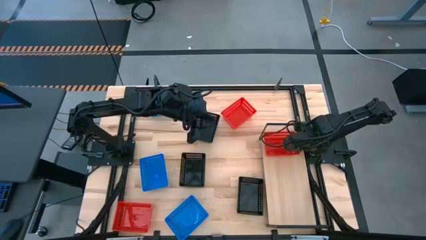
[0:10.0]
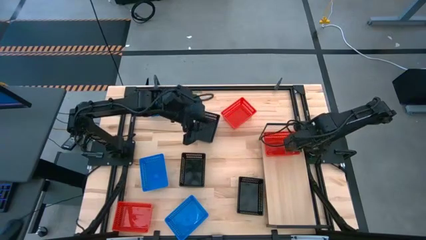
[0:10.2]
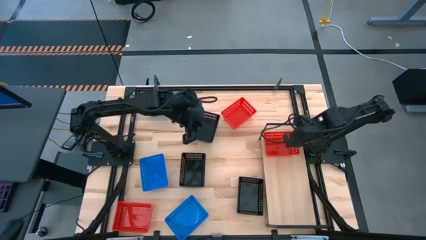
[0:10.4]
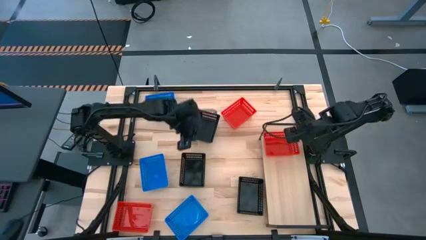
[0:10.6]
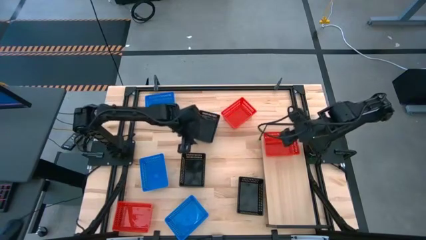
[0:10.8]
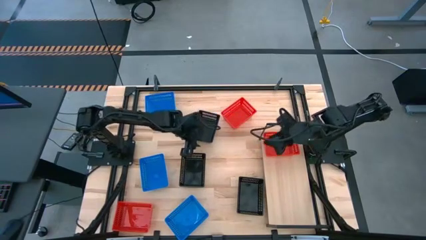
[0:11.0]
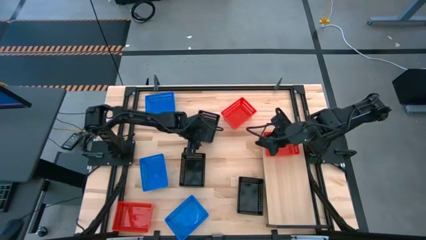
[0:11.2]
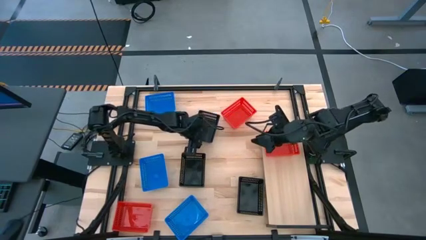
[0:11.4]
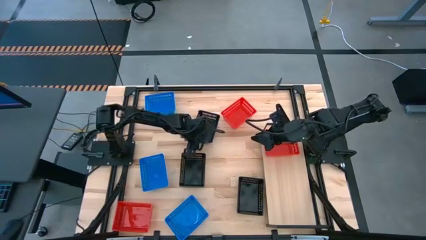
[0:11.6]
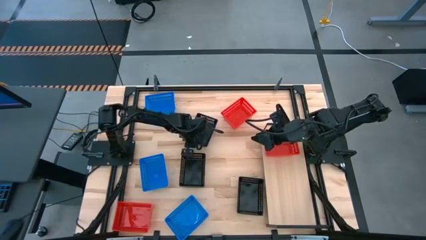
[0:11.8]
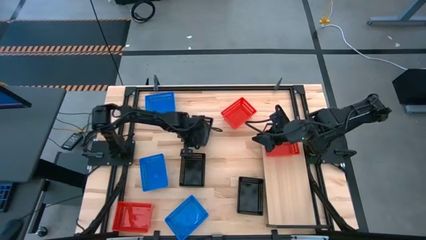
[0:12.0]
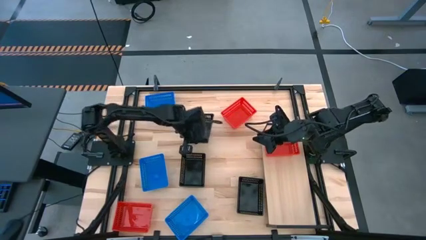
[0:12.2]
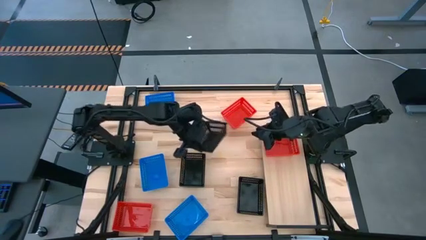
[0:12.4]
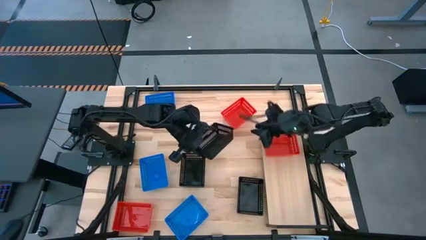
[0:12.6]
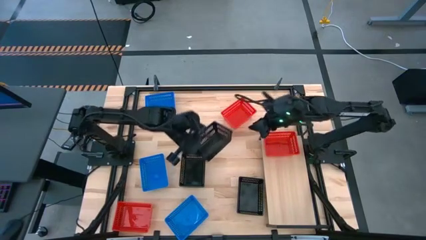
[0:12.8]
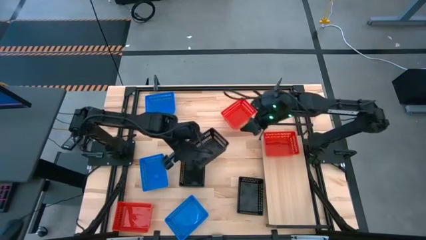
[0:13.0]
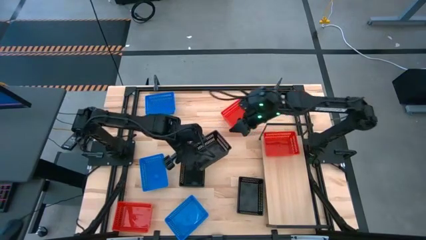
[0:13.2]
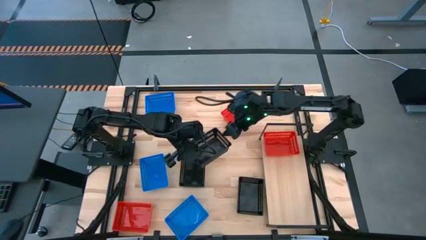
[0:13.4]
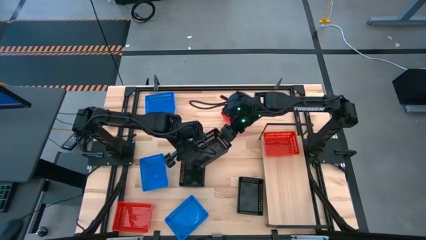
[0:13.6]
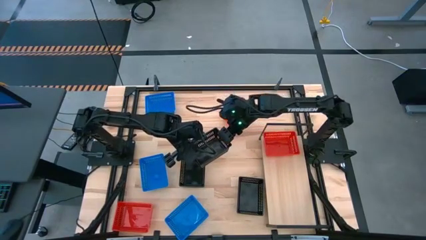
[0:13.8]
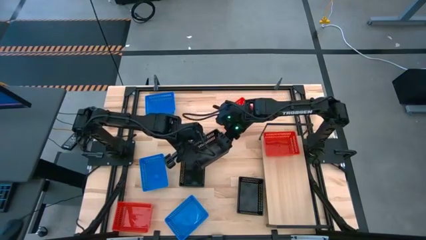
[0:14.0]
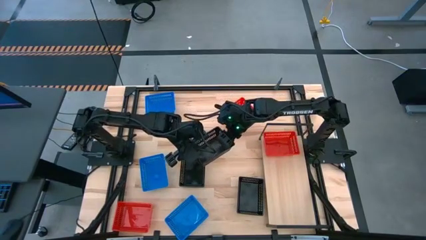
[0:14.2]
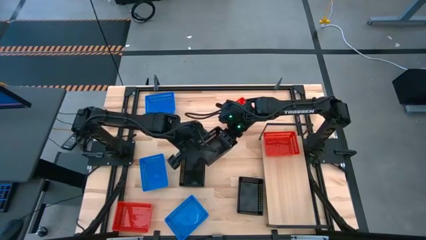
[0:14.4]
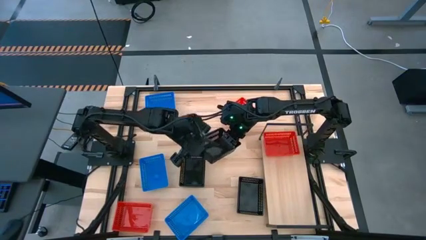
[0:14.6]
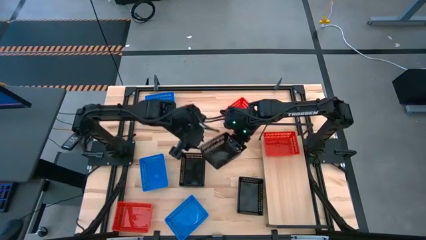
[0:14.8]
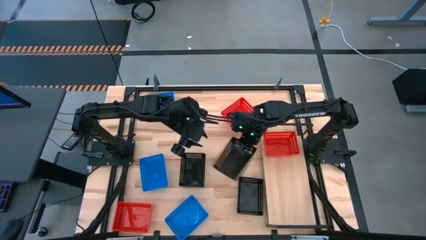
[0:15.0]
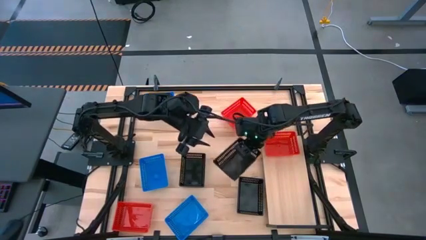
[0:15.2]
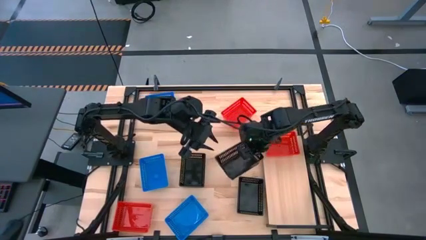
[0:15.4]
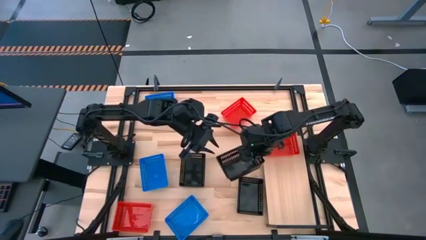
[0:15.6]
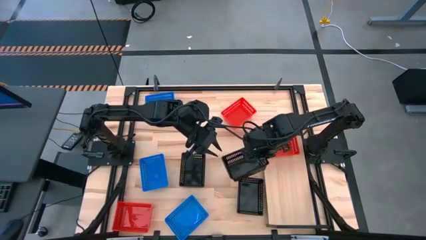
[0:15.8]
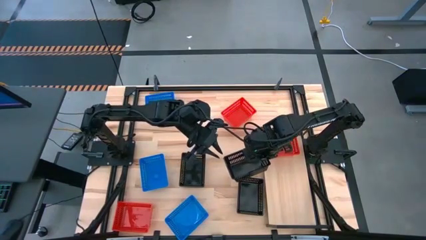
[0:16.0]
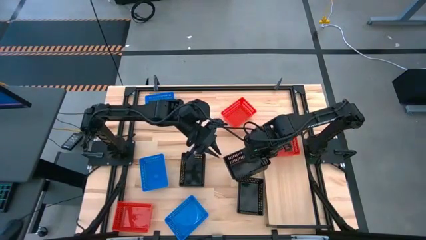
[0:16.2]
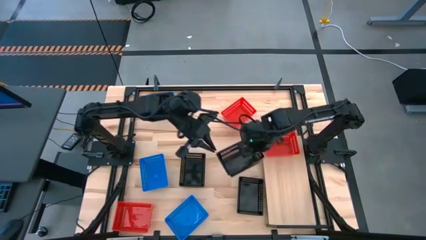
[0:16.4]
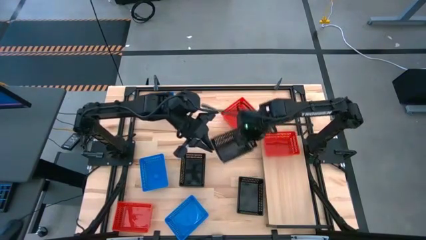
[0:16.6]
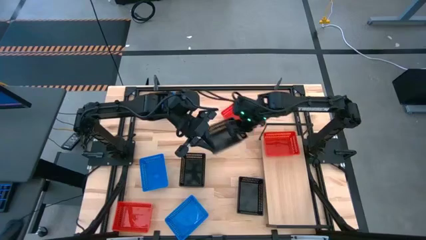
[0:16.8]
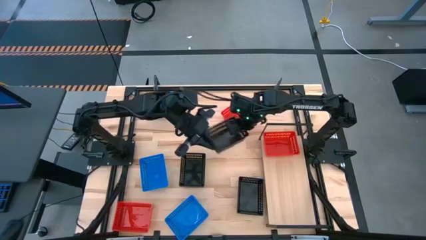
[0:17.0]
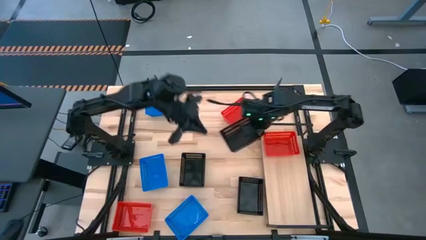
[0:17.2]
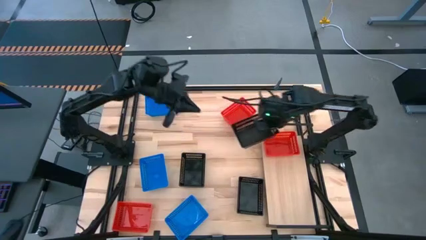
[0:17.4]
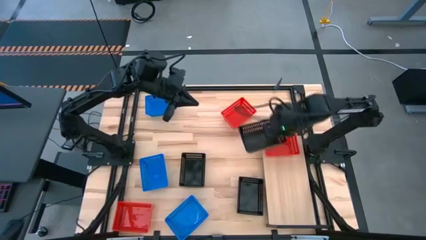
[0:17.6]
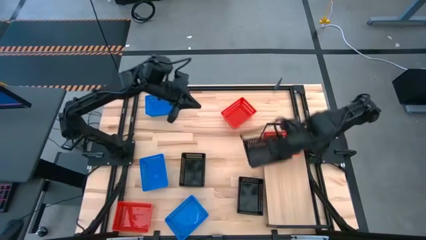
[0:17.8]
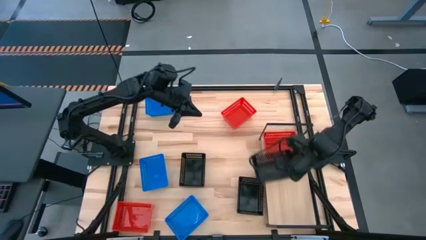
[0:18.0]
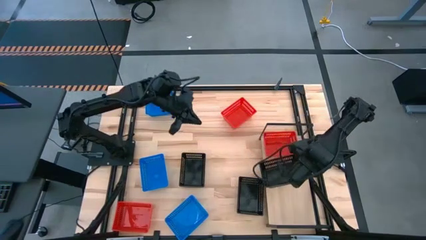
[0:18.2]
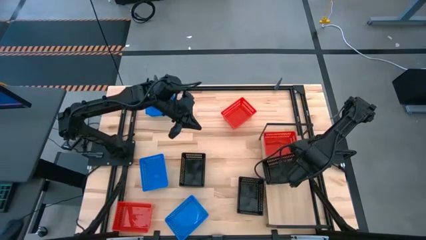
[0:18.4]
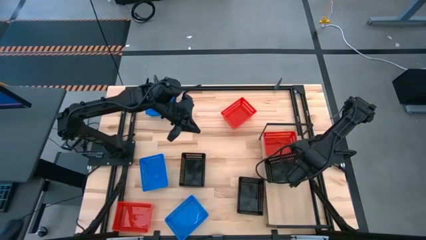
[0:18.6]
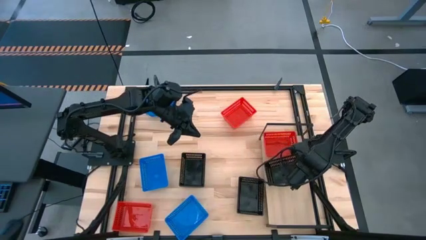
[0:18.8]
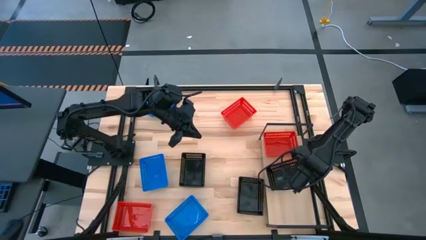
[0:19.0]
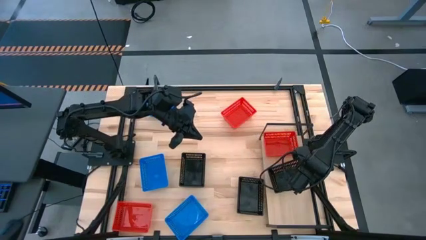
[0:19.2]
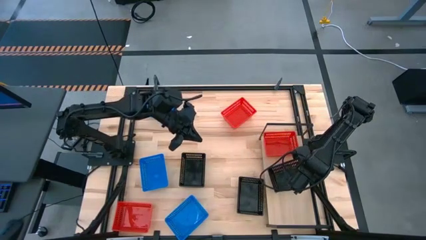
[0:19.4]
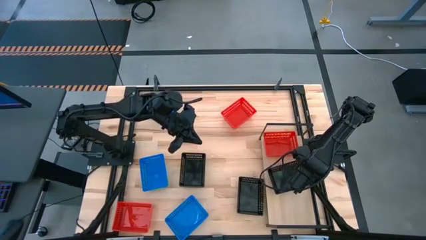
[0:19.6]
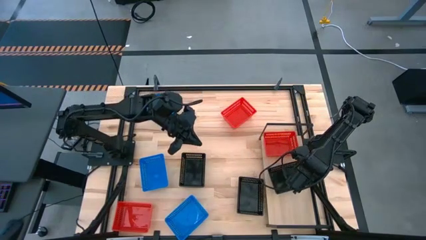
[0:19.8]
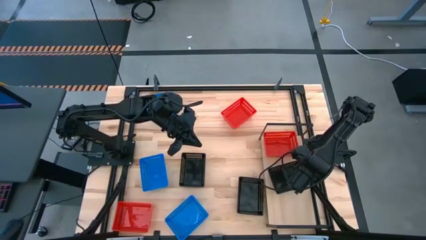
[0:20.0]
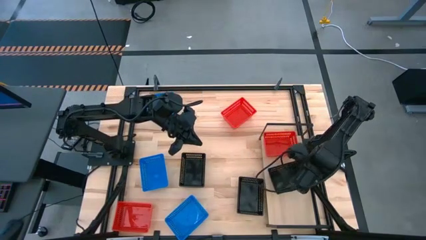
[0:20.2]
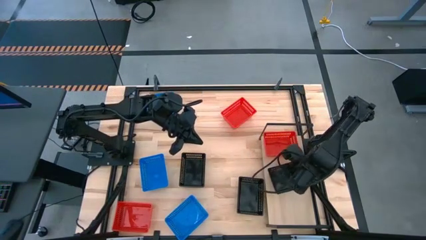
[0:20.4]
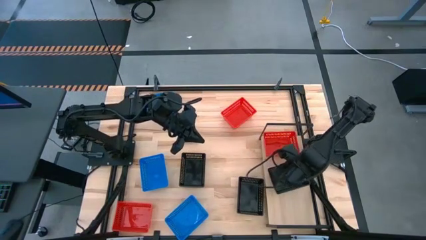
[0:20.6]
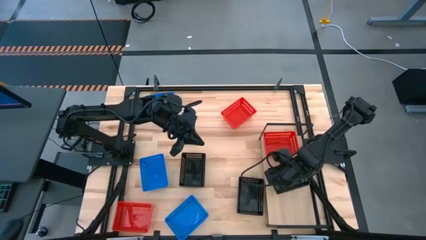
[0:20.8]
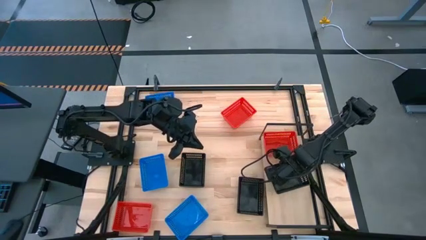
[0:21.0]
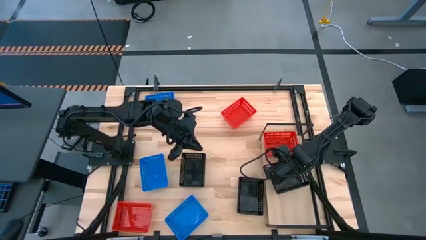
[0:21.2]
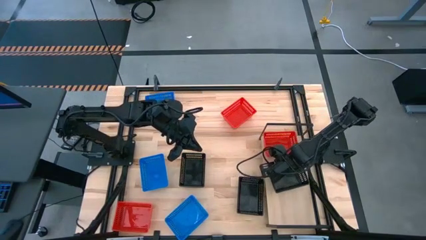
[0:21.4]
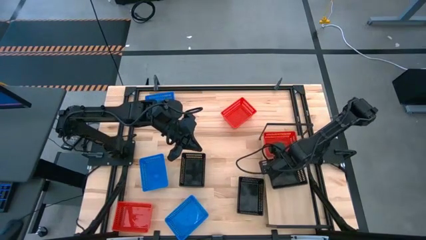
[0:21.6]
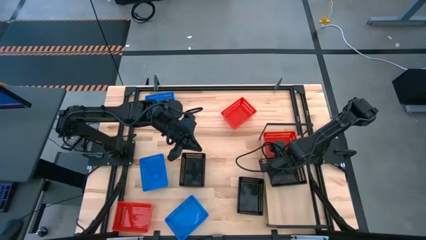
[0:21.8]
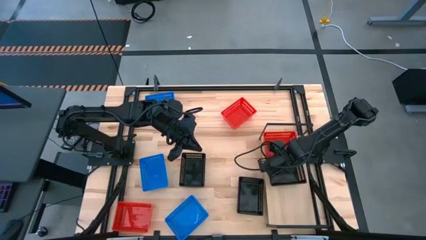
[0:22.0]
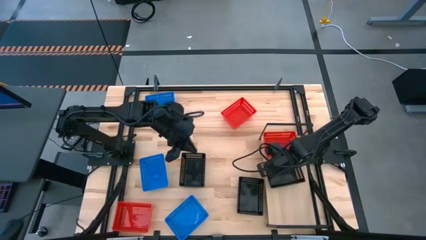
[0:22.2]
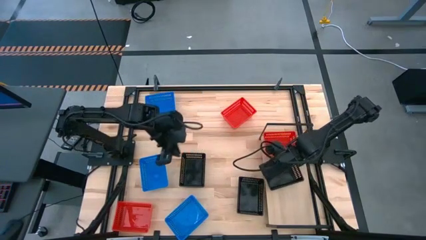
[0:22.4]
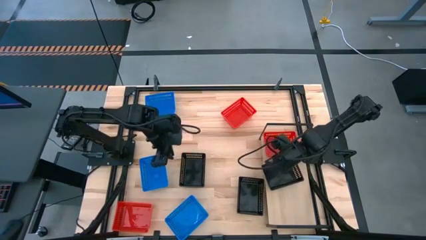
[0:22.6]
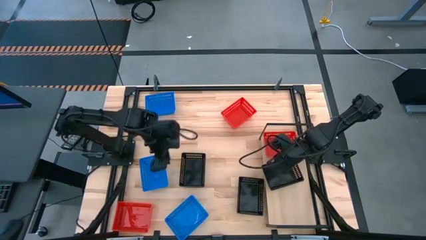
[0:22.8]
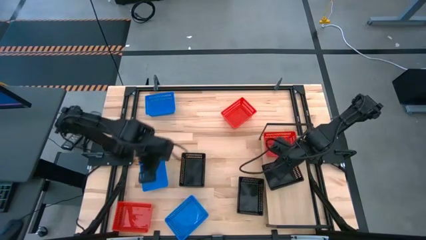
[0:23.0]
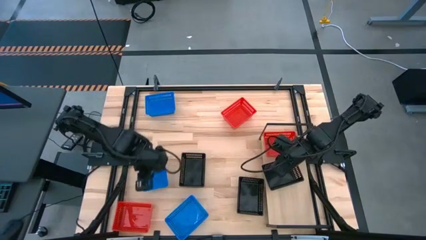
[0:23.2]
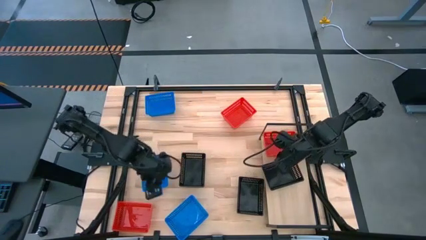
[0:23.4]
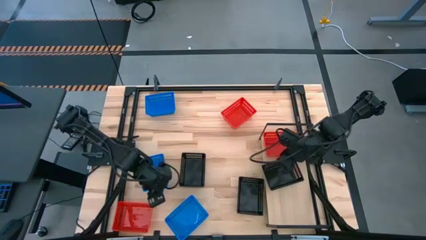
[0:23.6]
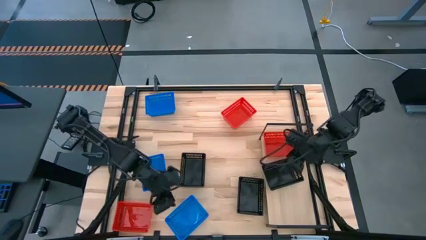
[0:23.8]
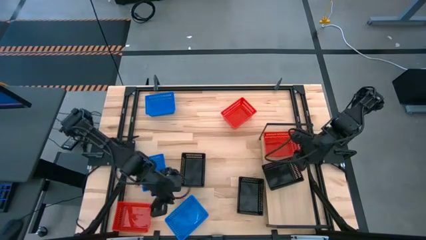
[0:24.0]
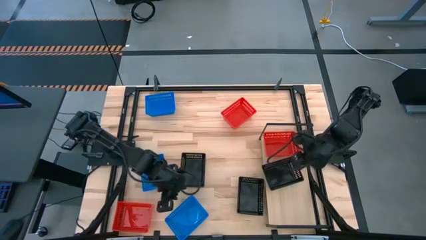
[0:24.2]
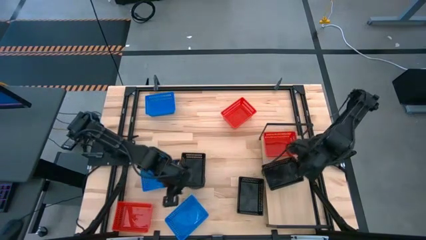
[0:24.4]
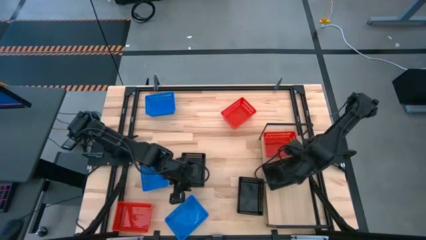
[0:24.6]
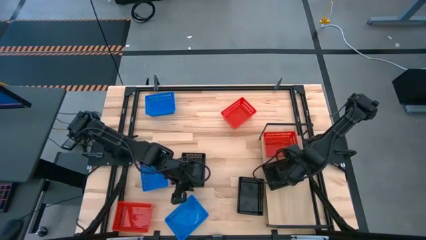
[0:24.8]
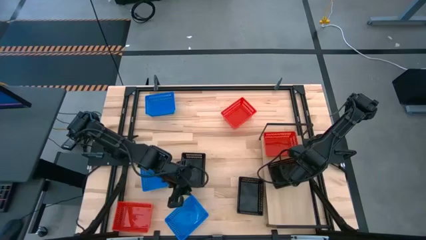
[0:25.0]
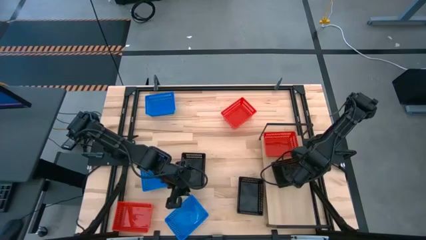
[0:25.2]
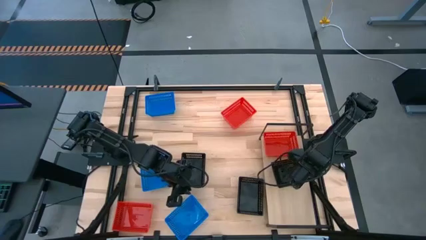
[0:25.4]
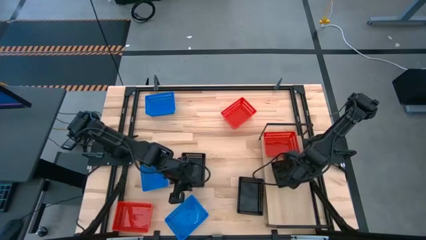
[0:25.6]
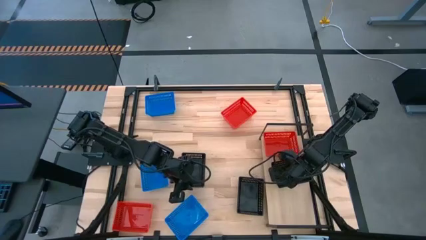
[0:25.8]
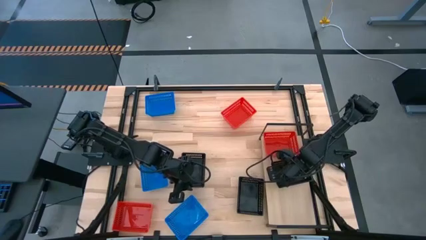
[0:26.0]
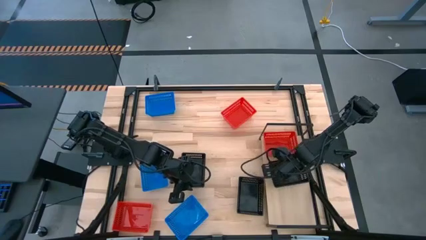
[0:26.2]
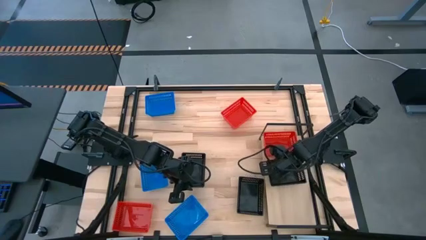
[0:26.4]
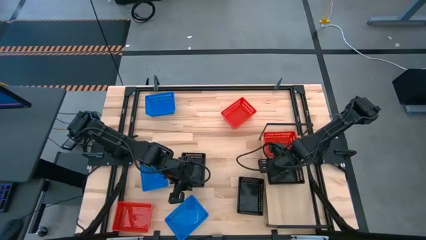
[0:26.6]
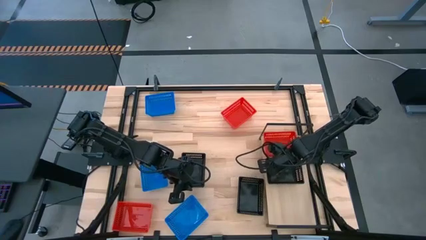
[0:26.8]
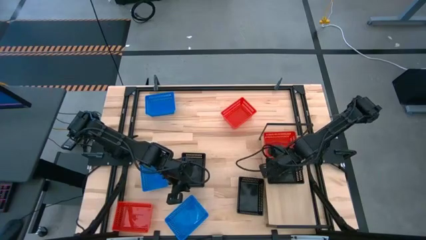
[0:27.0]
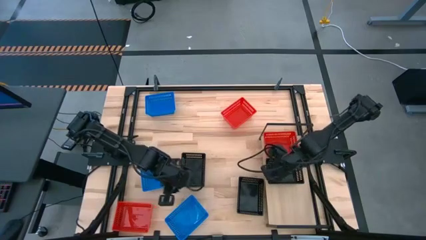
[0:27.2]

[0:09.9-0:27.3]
Task: Stack baskets on shelf by color
Put the top black bin on the shelf
